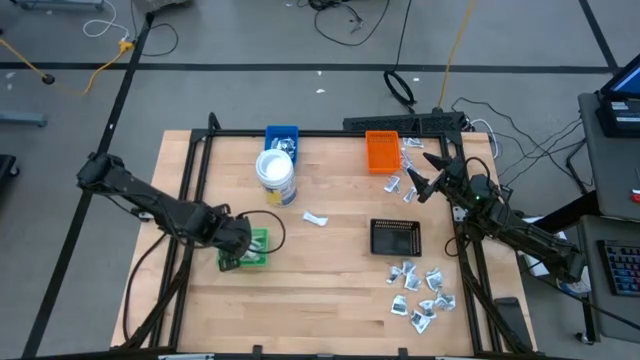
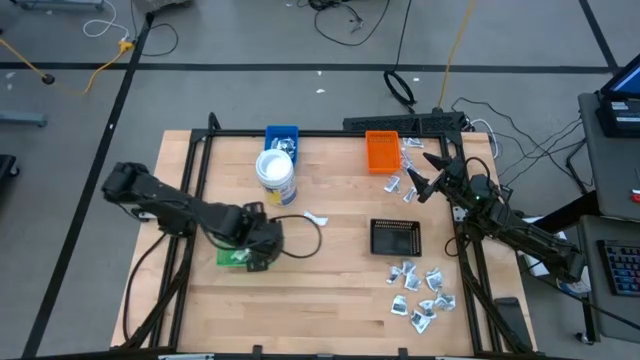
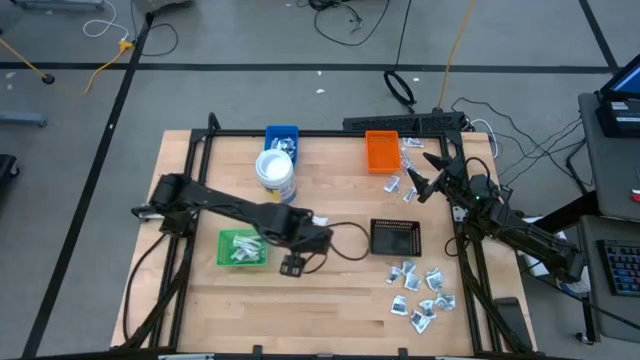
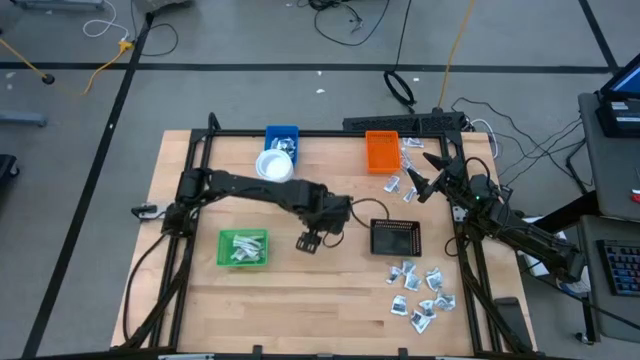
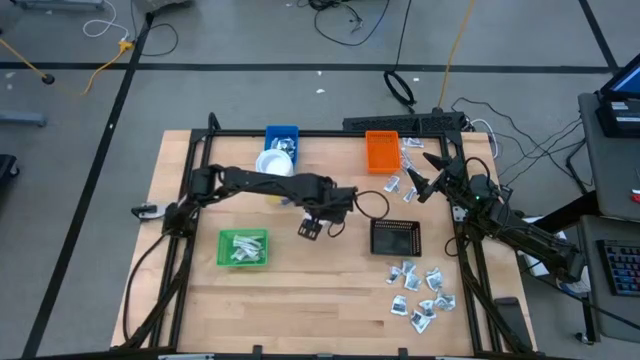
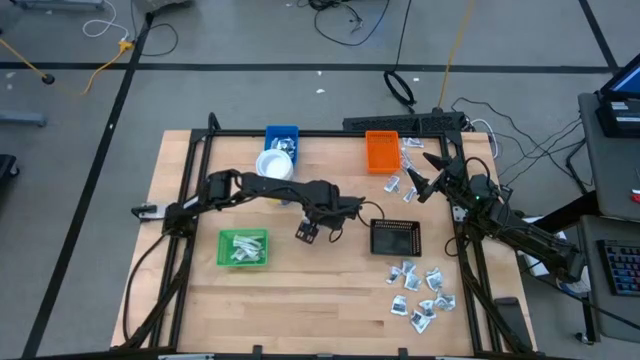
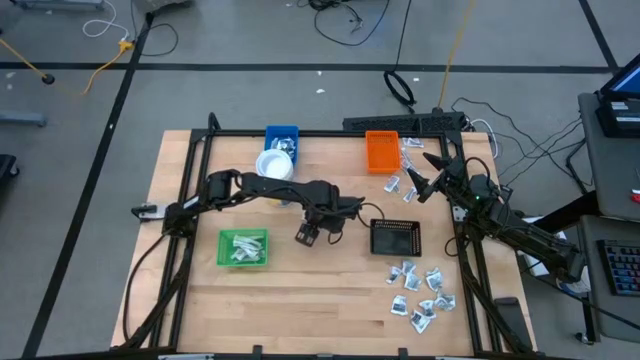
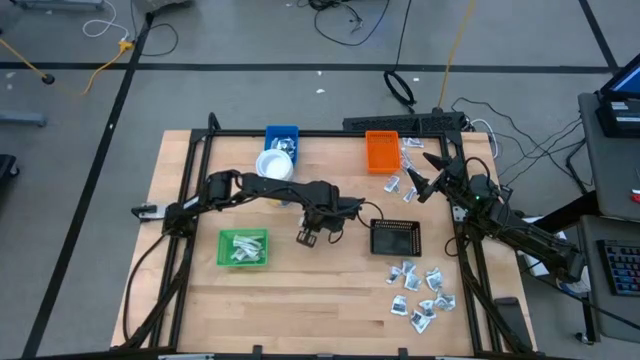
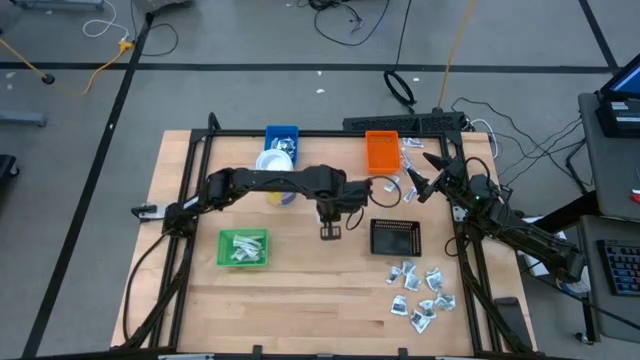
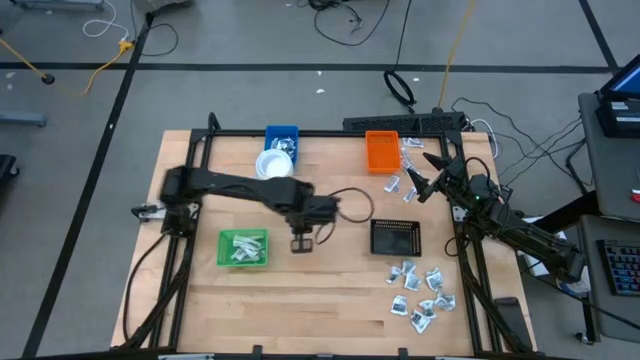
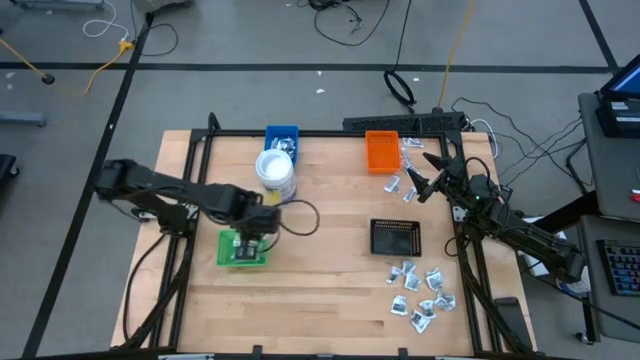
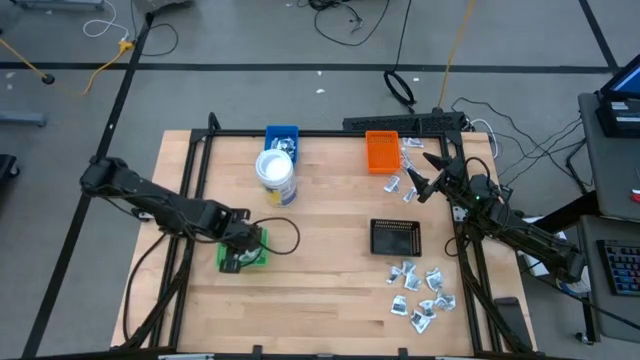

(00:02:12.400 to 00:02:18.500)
Task: Pick & Place First Aid Supplies
Put the green bandage pack into the green bin

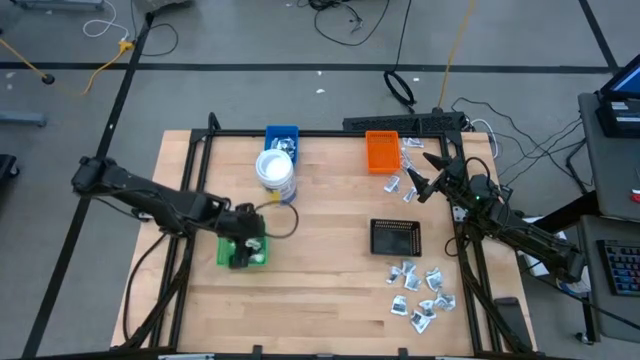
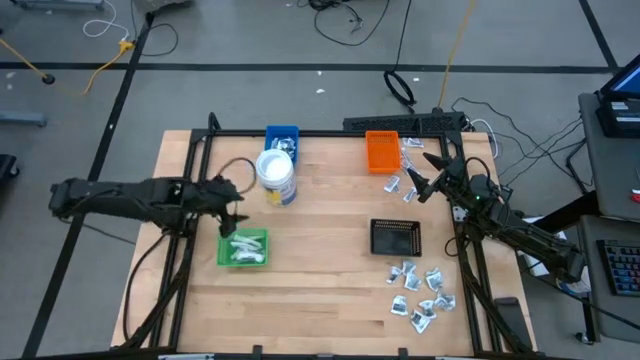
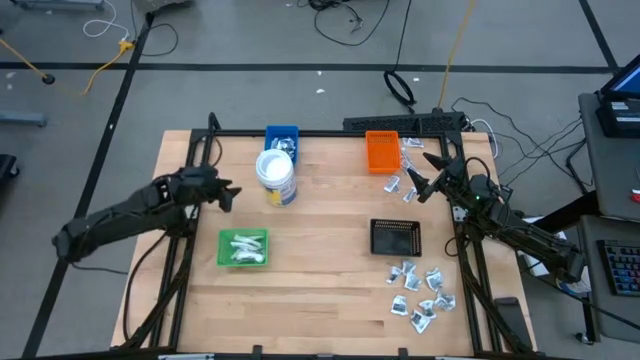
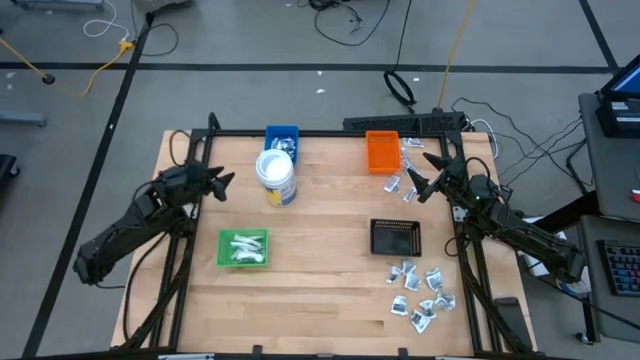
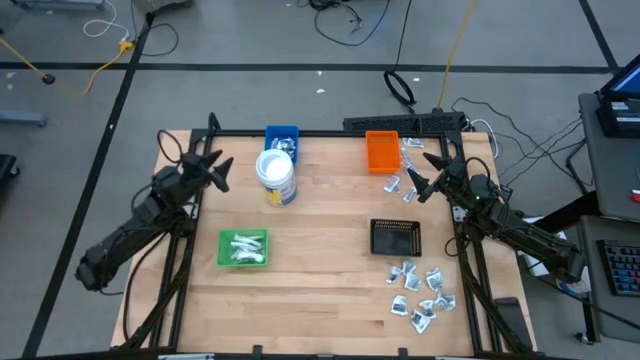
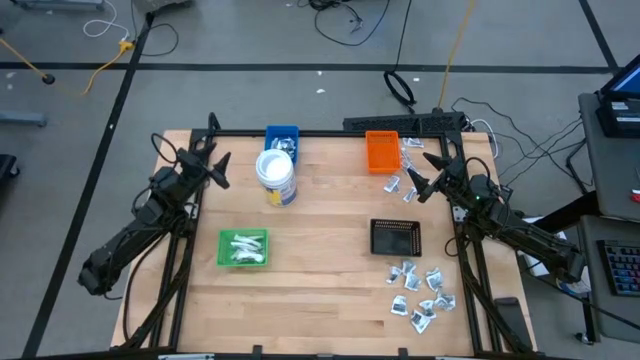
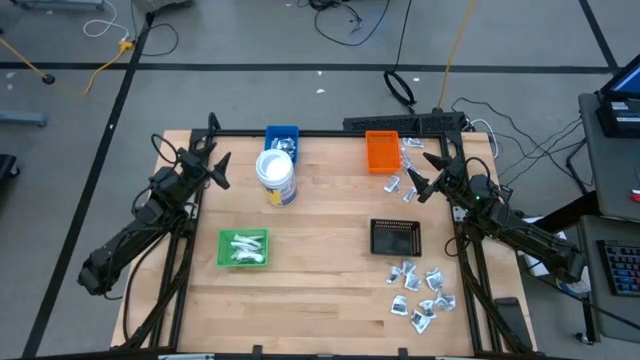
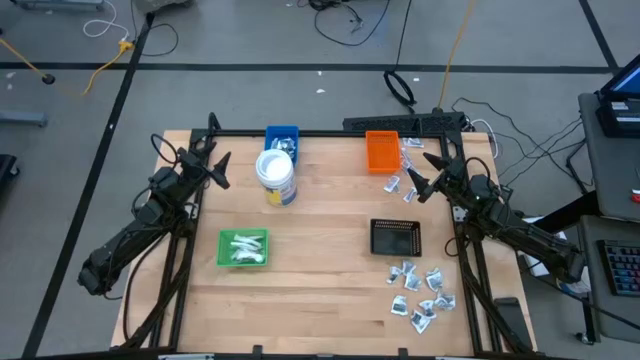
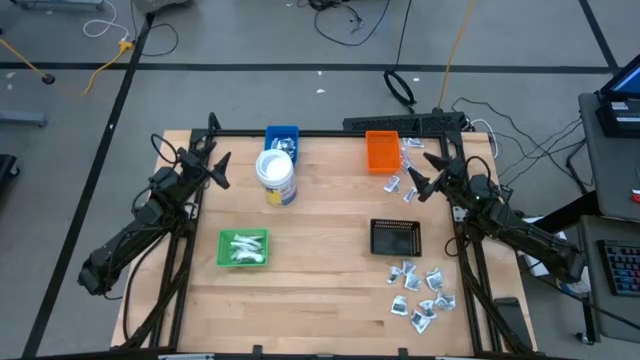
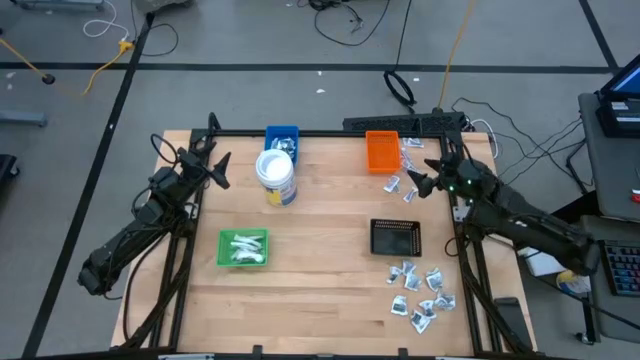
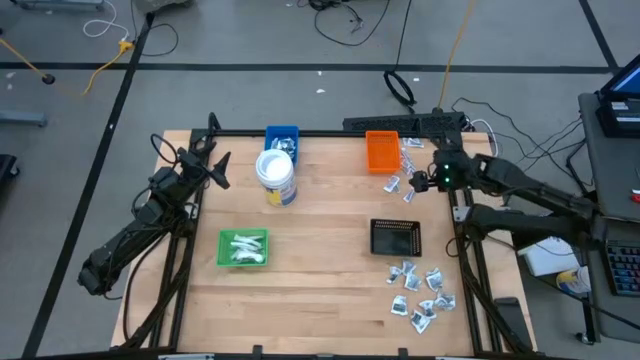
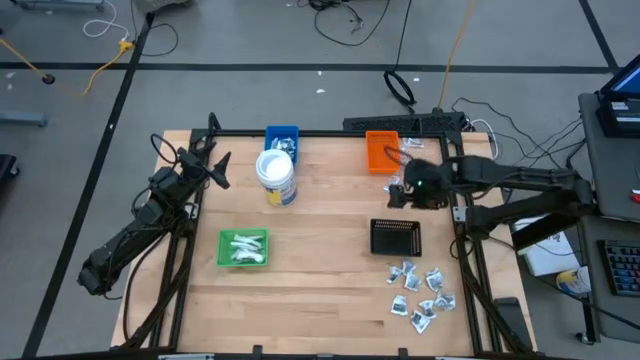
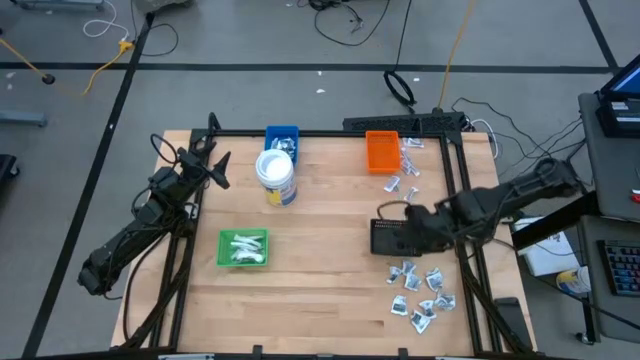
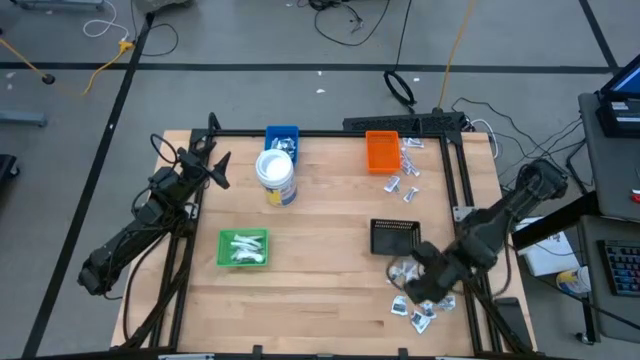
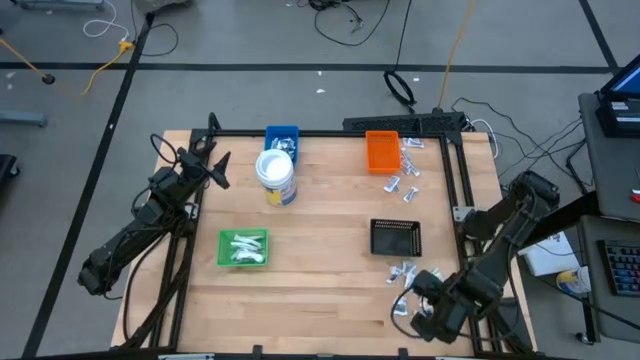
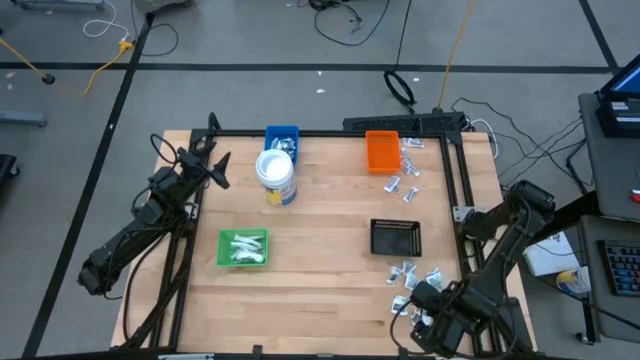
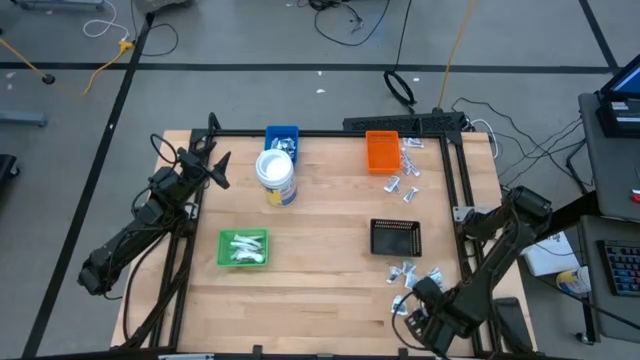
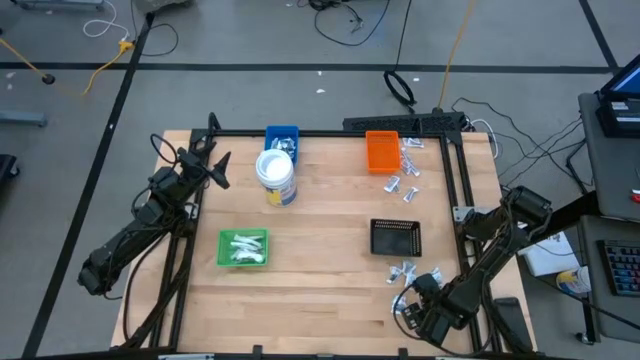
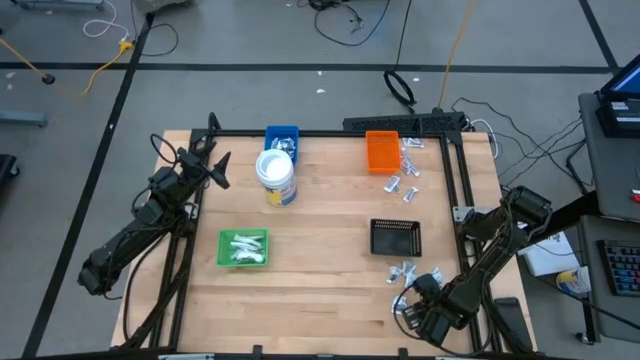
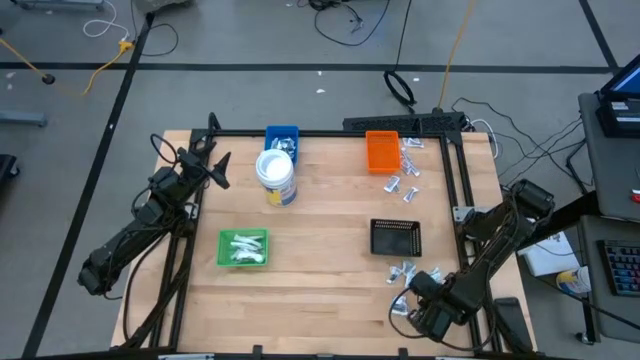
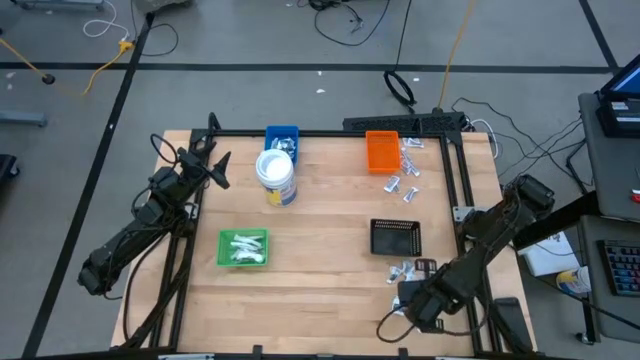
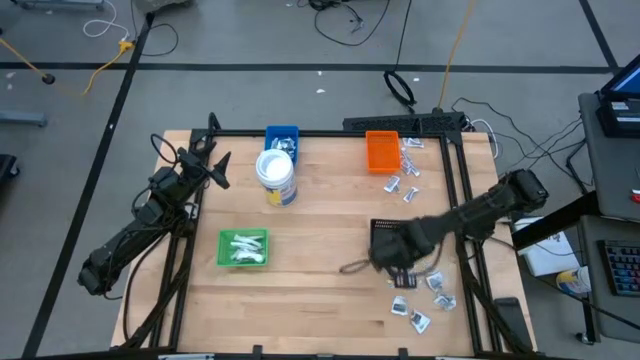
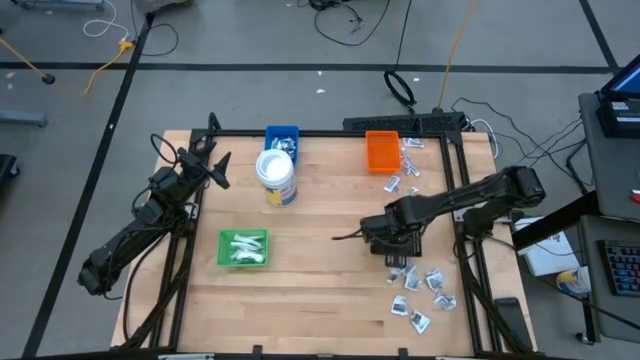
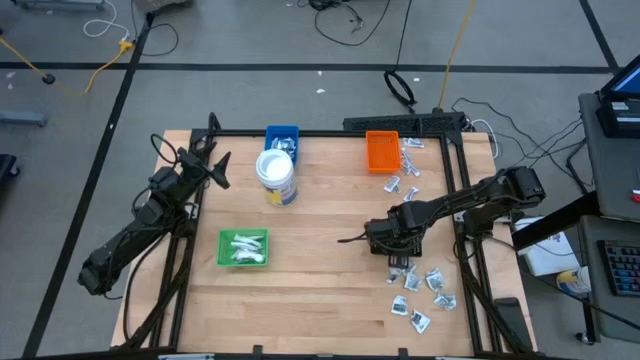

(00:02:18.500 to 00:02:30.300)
Put the gray towelette pack into the black bin

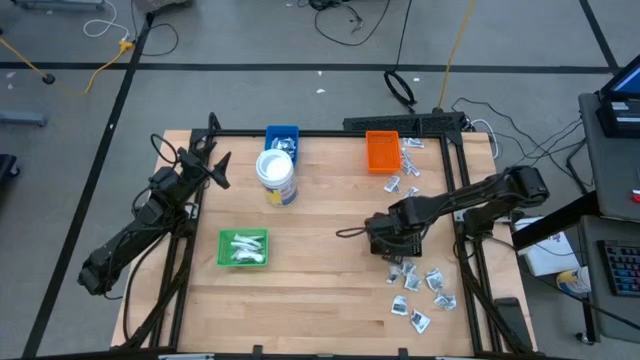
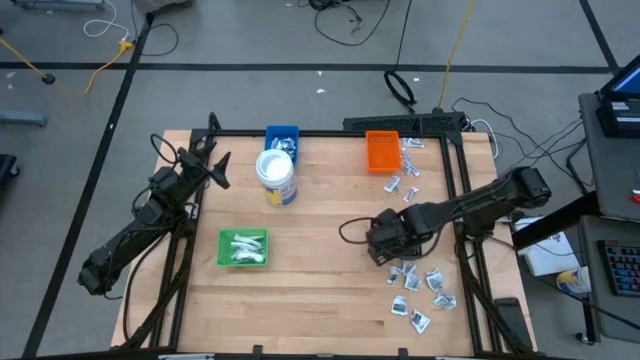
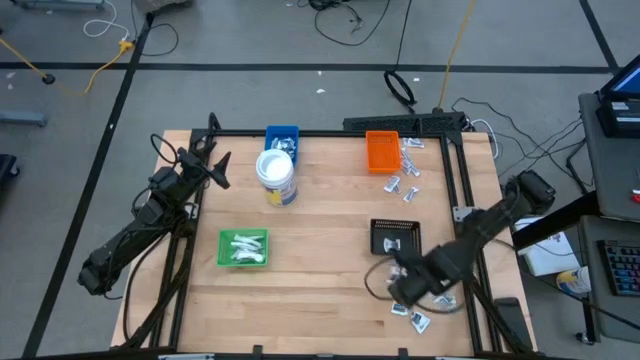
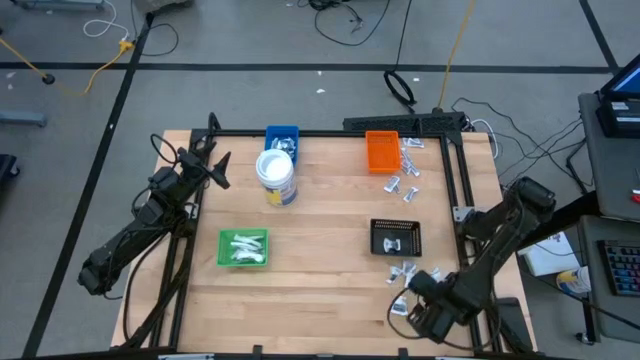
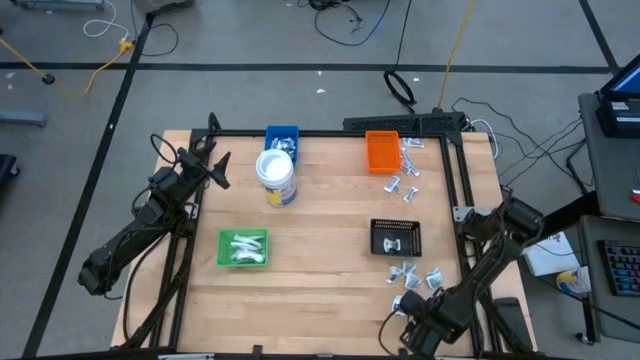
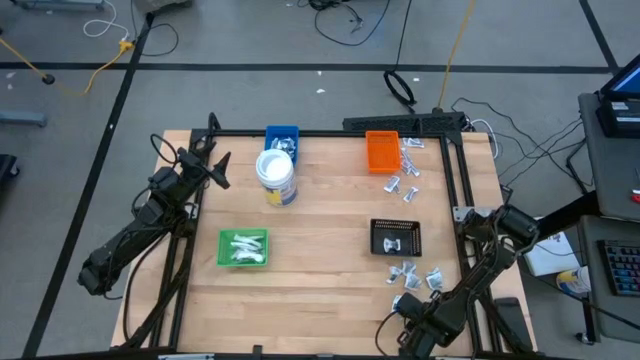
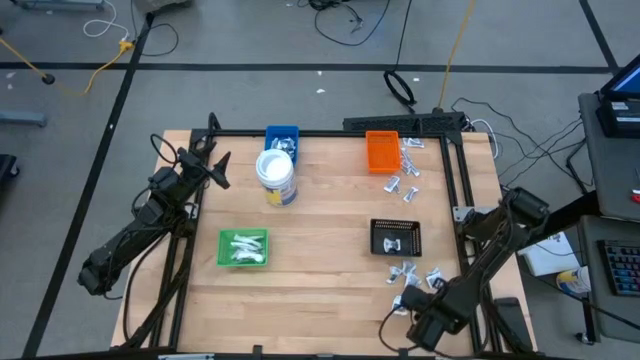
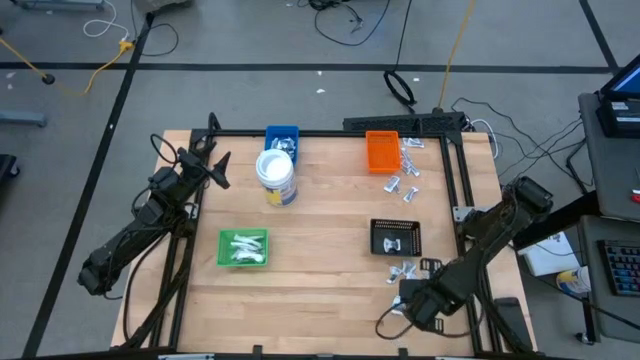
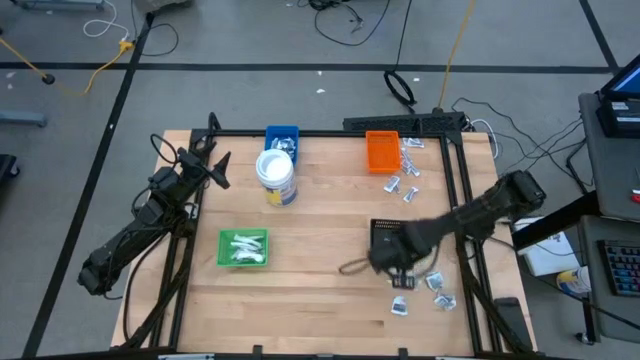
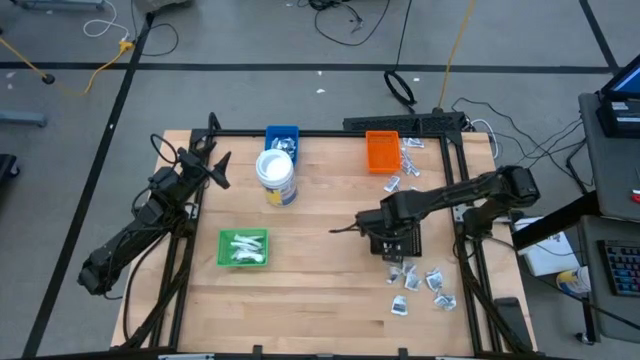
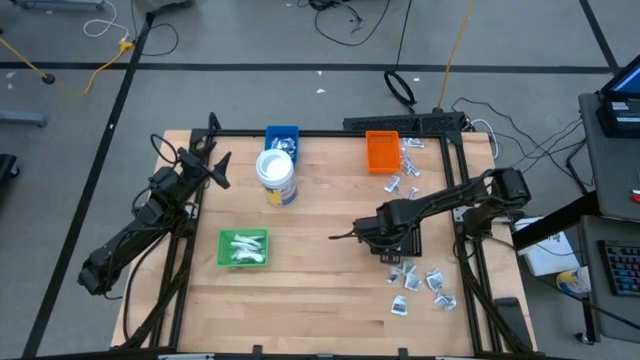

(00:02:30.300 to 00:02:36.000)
Put the gray towelette pack into the black bin
